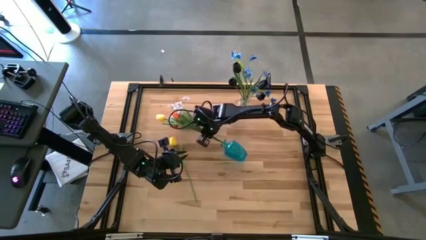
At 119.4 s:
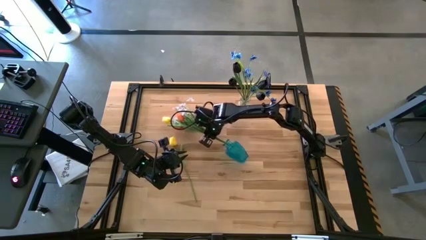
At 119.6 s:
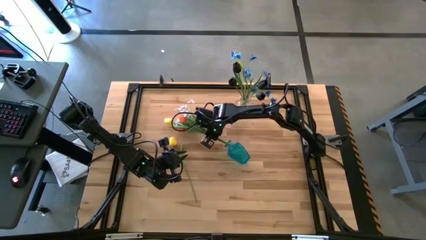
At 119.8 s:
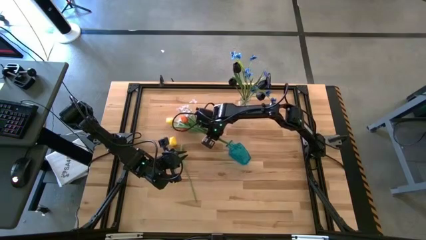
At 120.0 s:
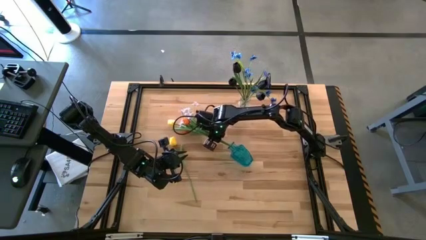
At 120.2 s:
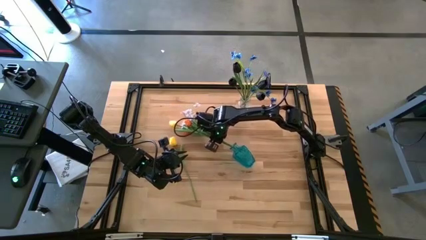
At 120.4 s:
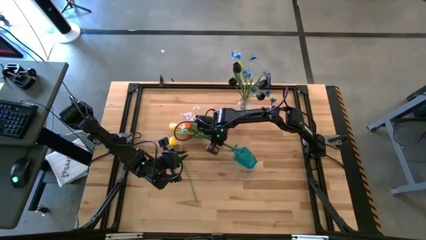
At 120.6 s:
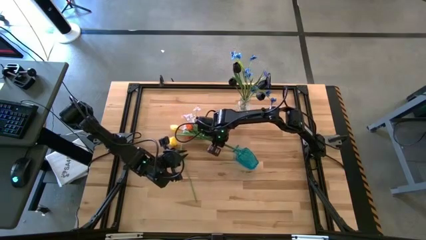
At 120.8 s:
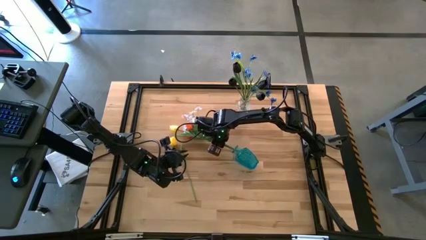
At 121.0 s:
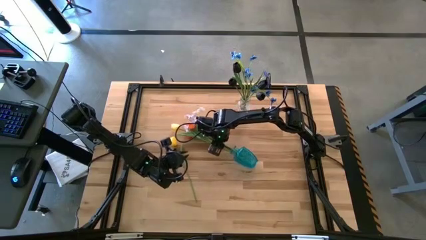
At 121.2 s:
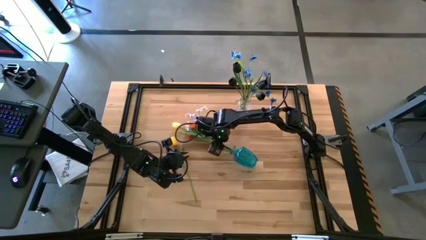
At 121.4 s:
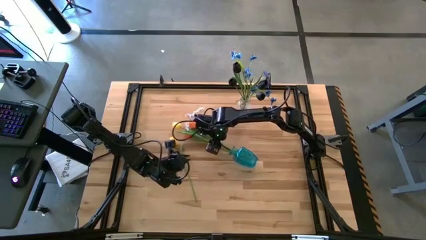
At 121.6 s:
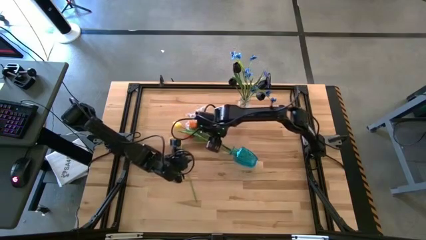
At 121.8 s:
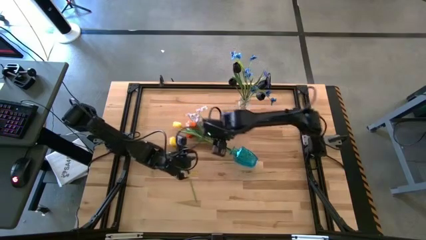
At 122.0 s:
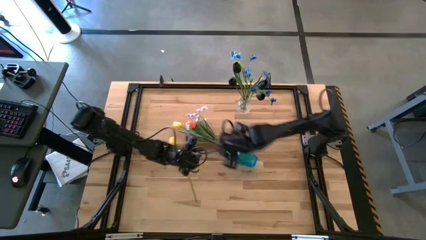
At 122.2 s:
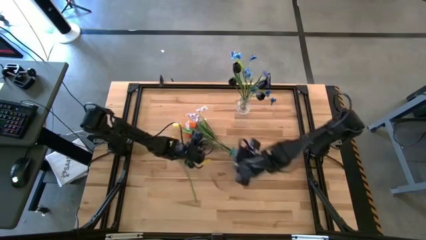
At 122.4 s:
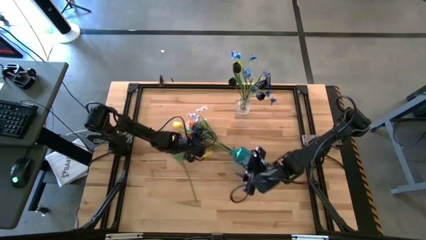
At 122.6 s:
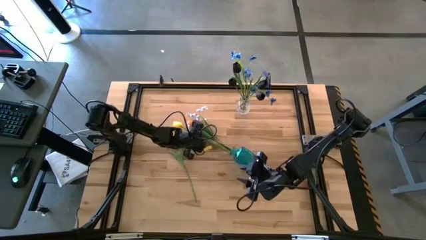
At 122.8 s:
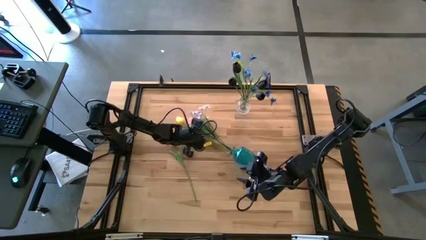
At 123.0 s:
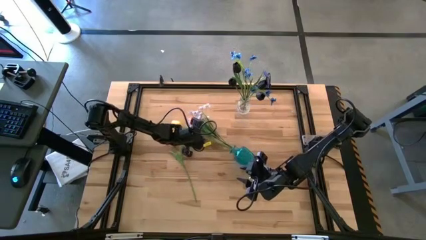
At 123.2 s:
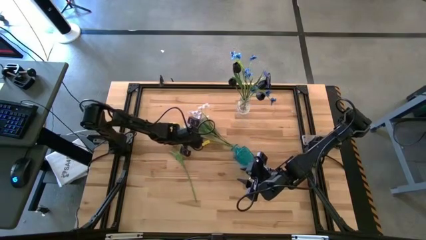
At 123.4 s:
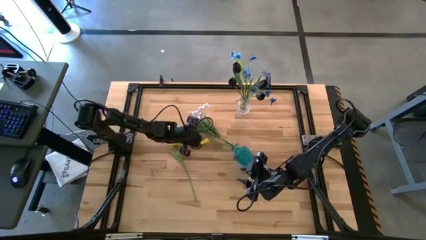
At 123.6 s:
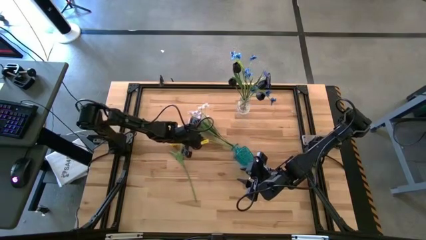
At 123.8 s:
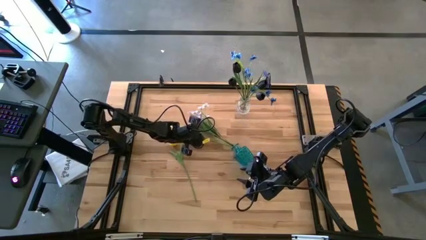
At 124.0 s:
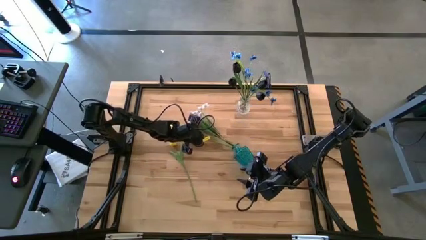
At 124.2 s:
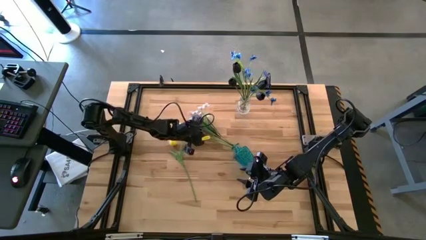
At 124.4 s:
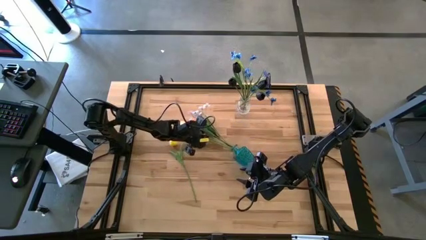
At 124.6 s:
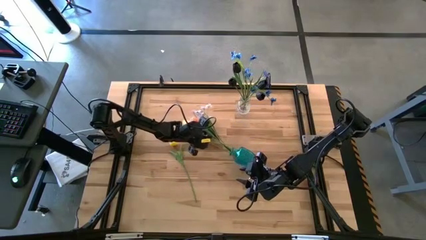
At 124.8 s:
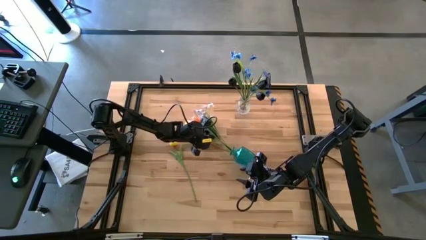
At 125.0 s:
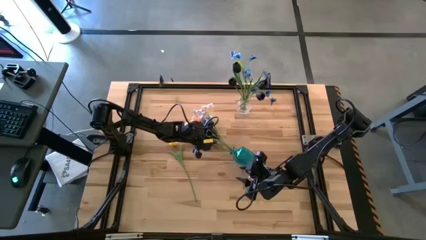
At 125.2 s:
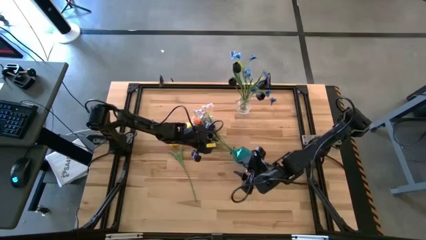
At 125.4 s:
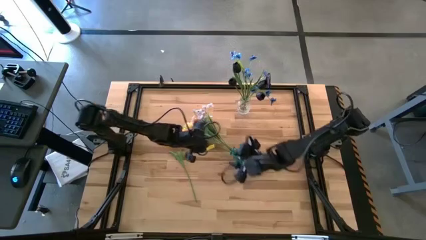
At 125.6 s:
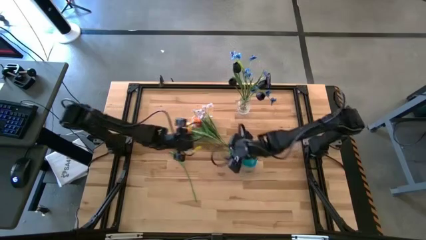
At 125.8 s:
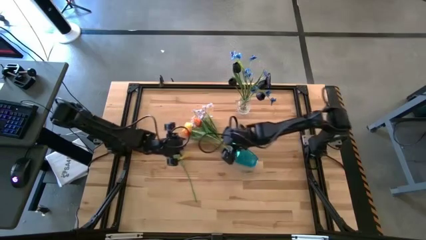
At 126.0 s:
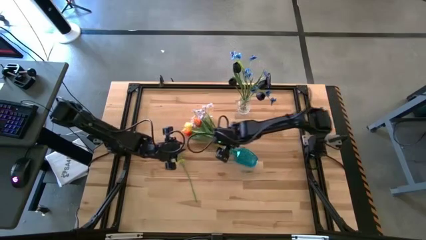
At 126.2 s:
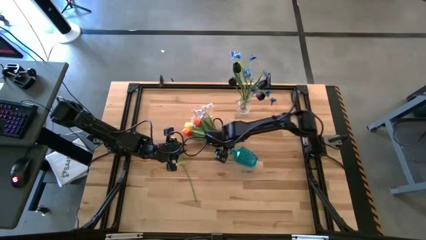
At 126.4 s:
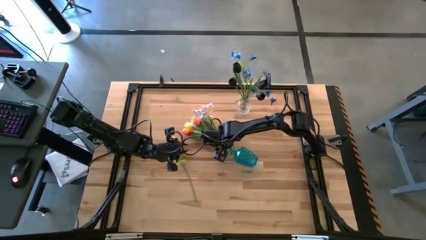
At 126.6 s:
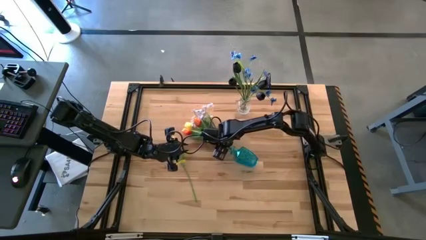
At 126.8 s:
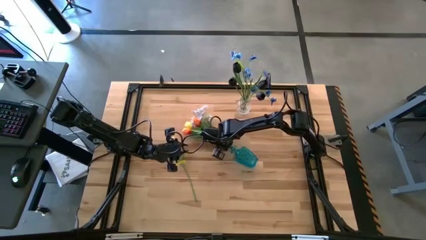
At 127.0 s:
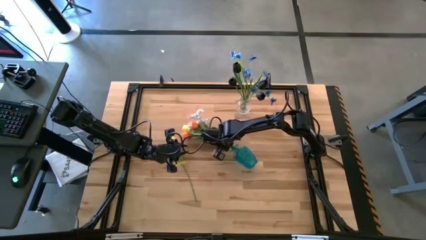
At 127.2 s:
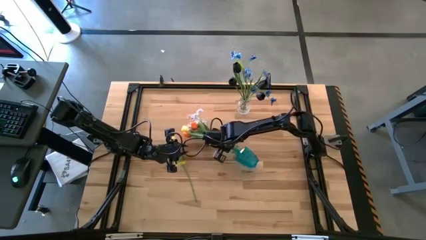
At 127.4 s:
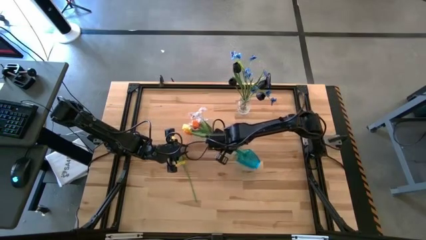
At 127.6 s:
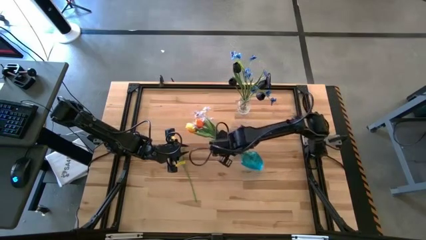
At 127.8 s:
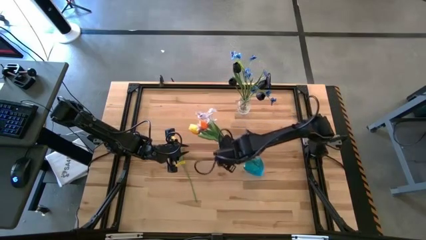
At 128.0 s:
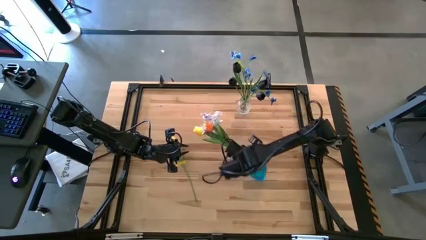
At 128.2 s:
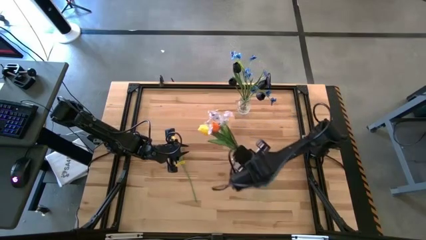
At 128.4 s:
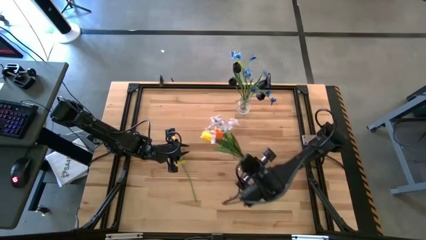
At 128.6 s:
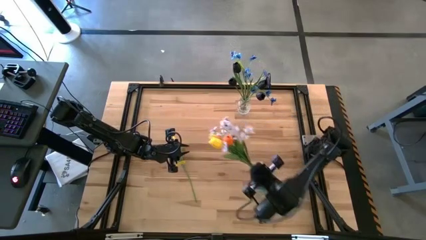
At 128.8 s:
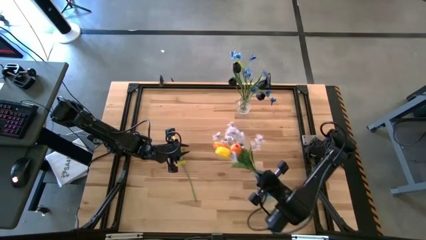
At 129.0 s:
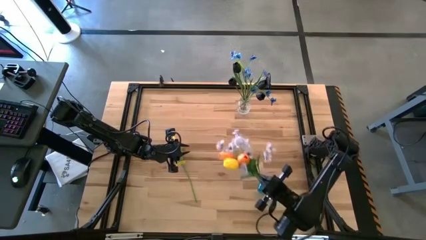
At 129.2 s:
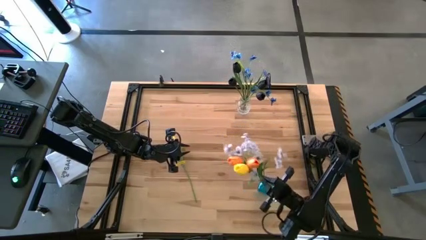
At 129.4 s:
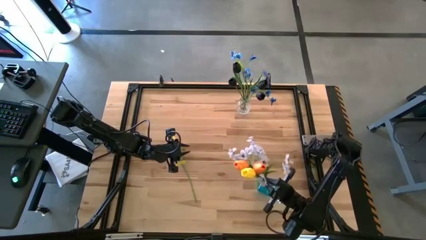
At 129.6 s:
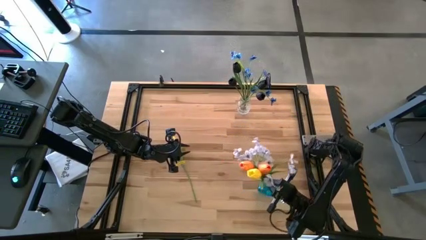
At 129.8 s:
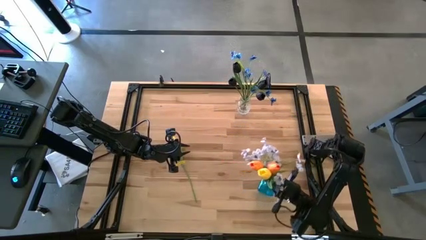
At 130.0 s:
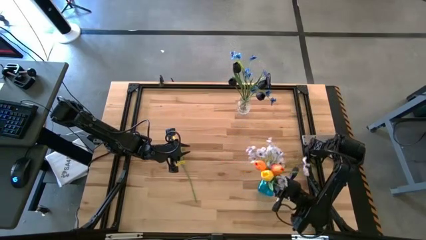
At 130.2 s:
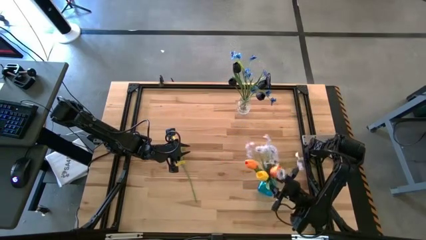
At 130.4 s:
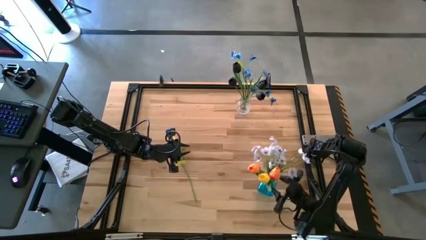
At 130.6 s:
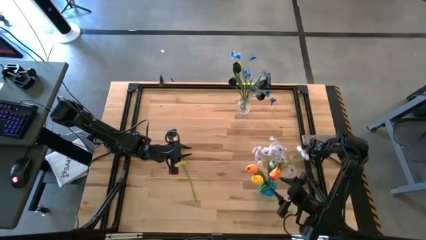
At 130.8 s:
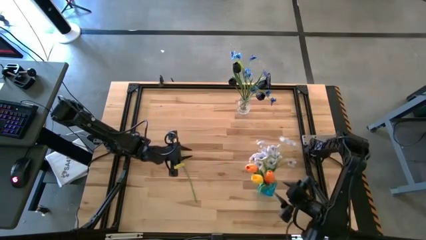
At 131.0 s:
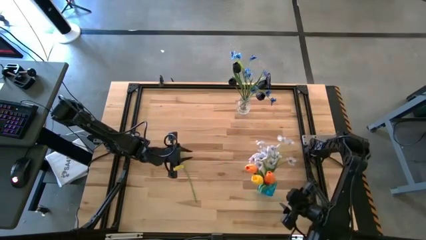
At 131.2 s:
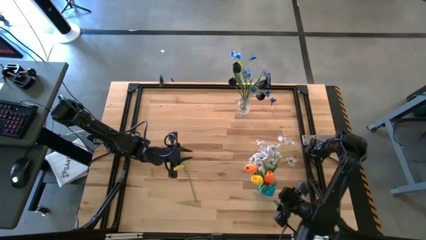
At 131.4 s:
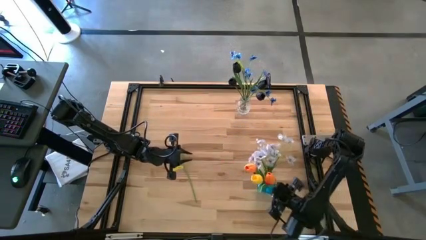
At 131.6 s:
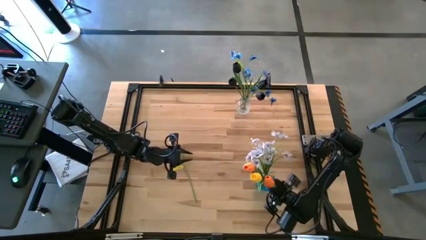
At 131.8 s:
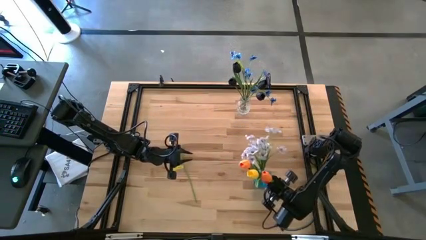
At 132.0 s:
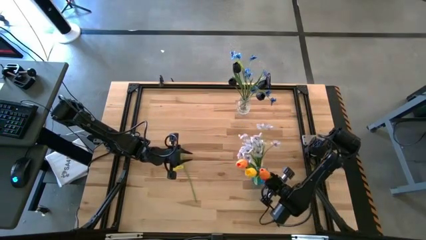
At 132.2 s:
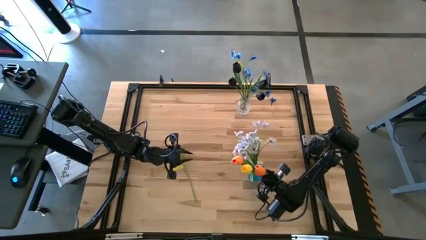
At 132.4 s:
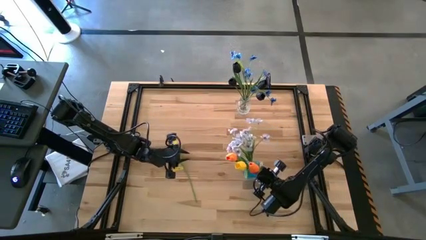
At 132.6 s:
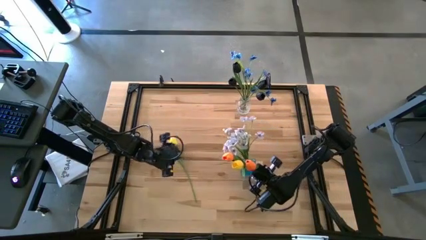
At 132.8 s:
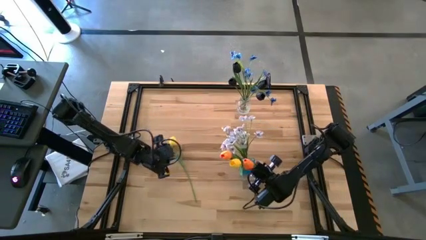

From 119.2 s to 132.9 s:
Task: Sort flowers into vase by color
Put the yellow tulip into the blue flower vase
